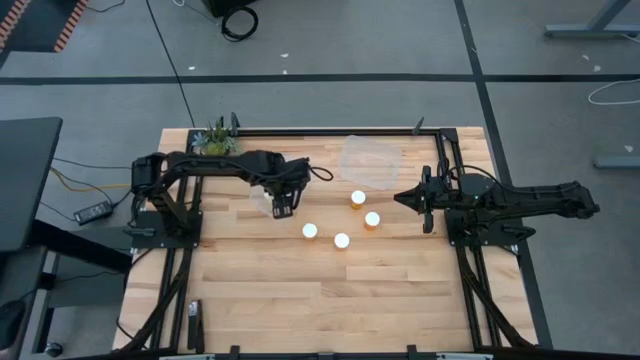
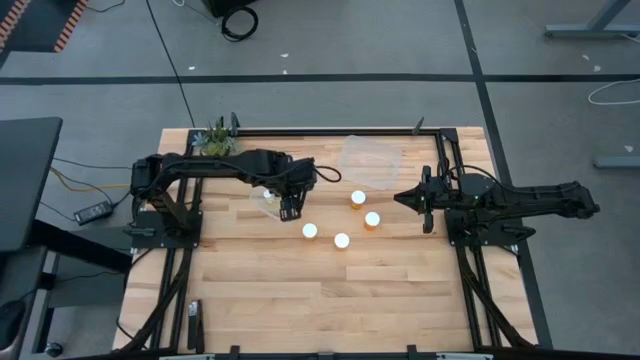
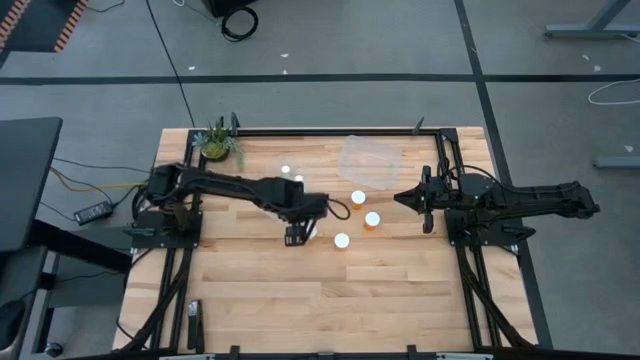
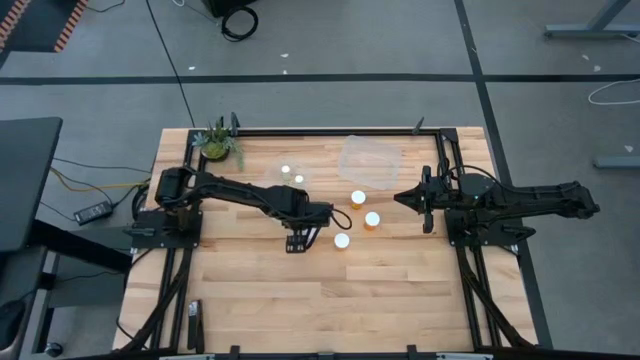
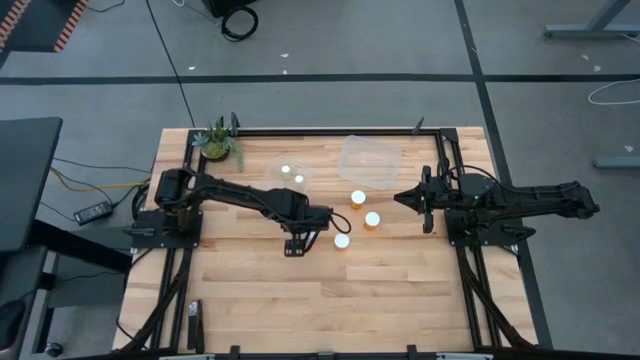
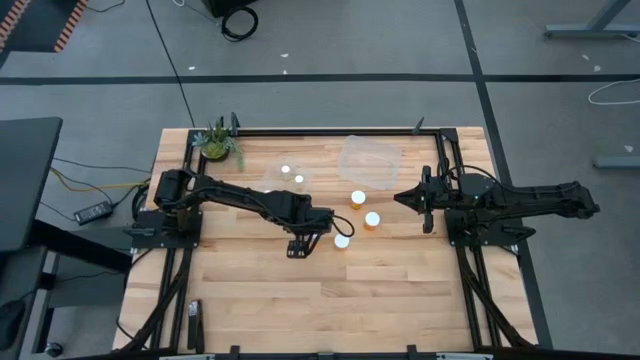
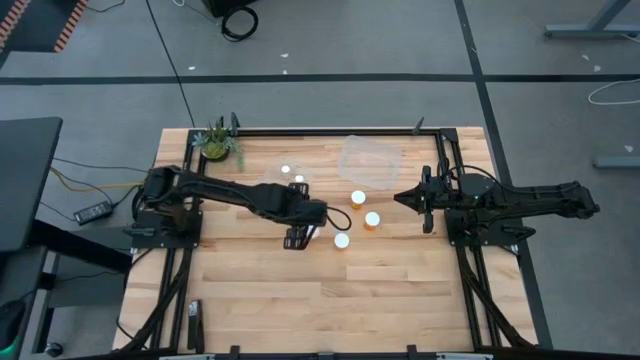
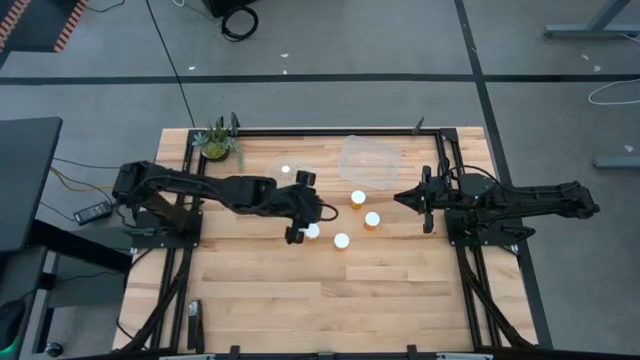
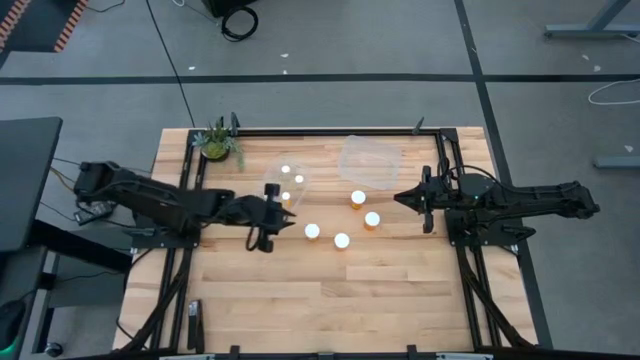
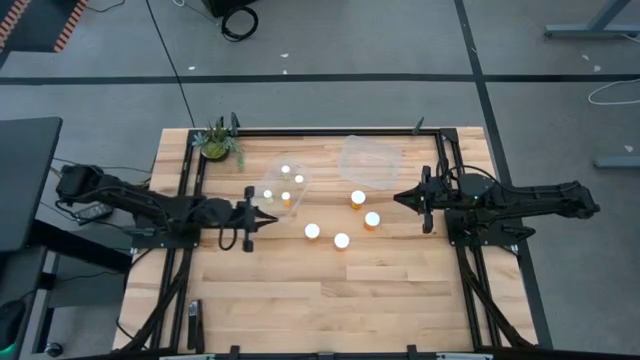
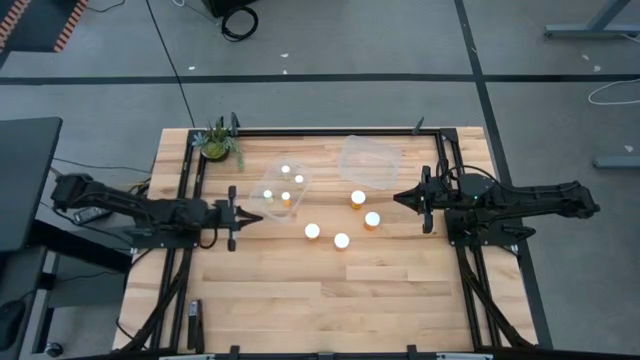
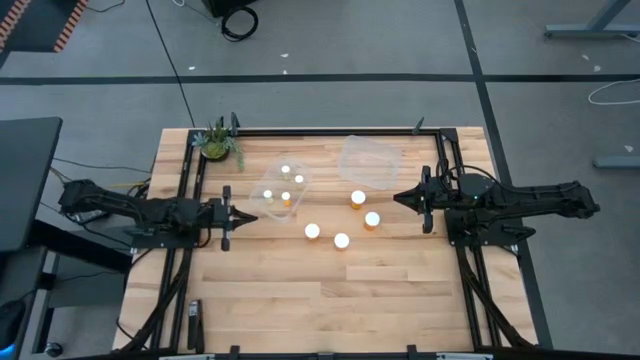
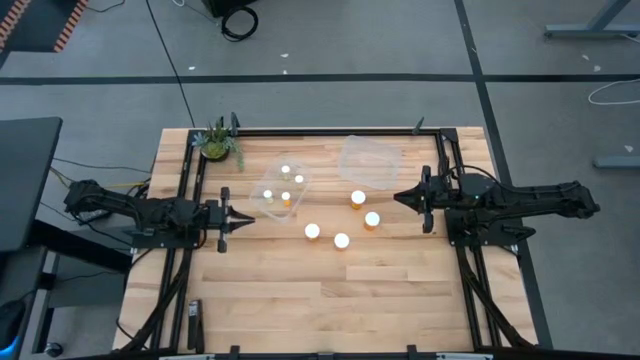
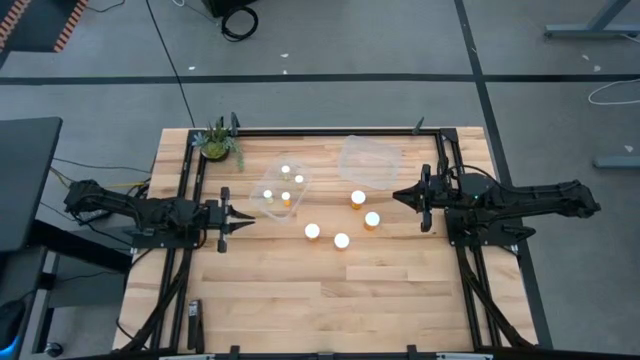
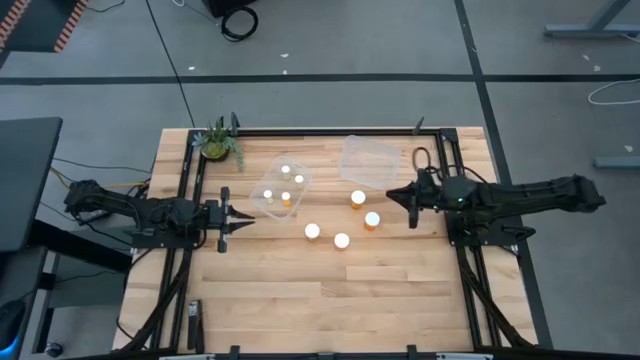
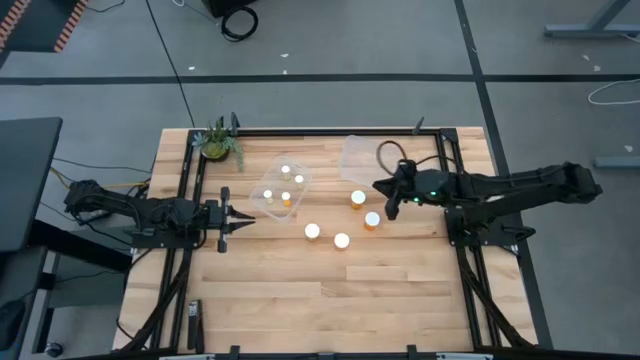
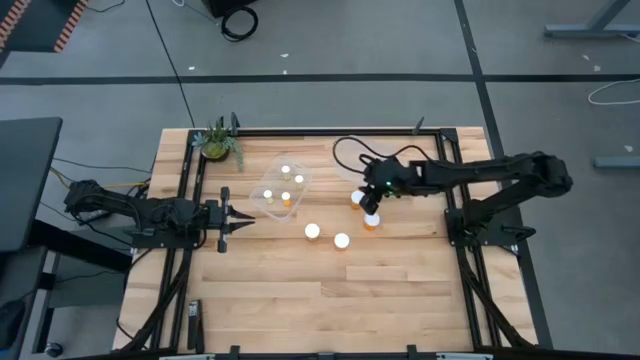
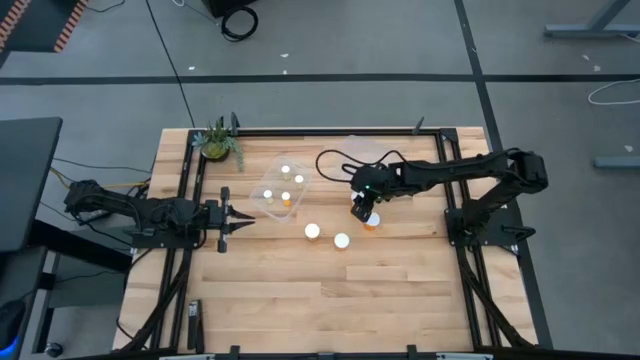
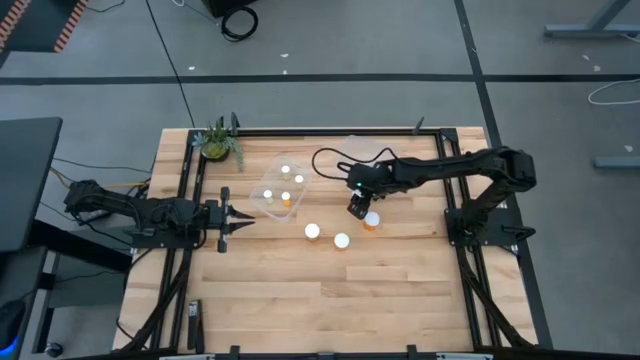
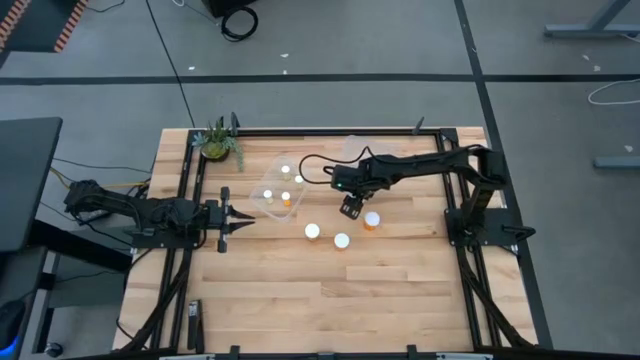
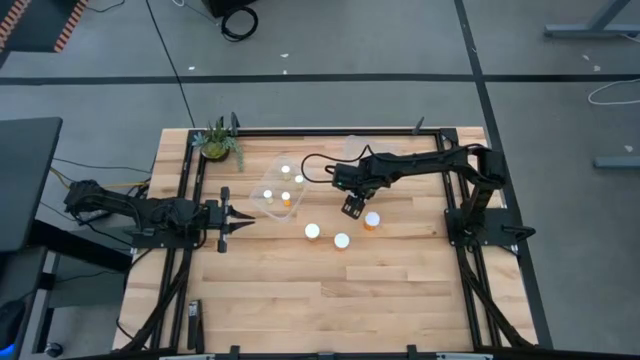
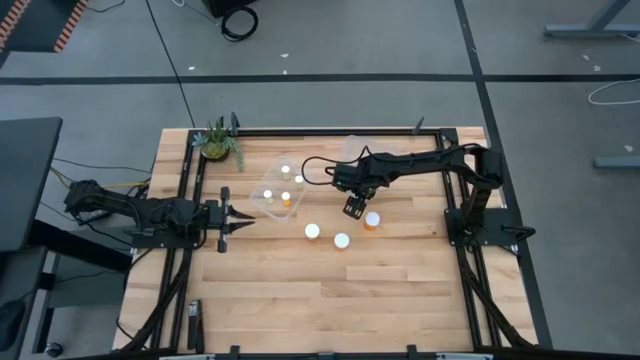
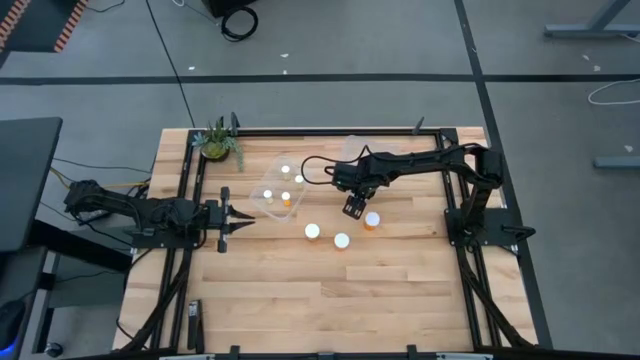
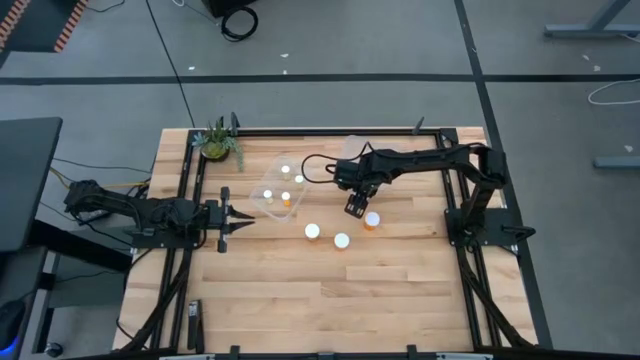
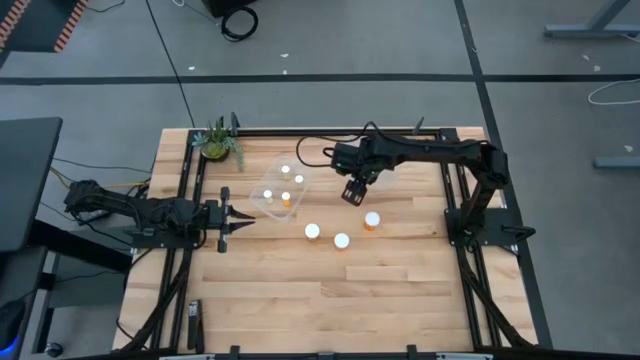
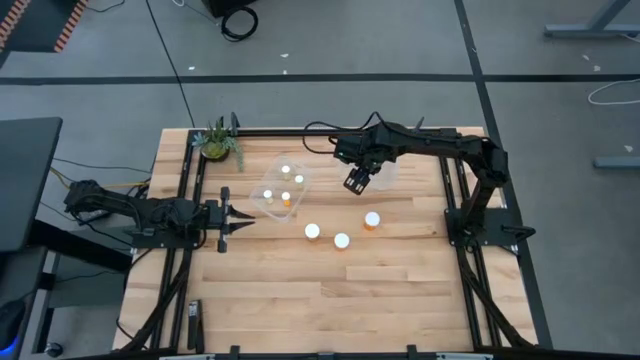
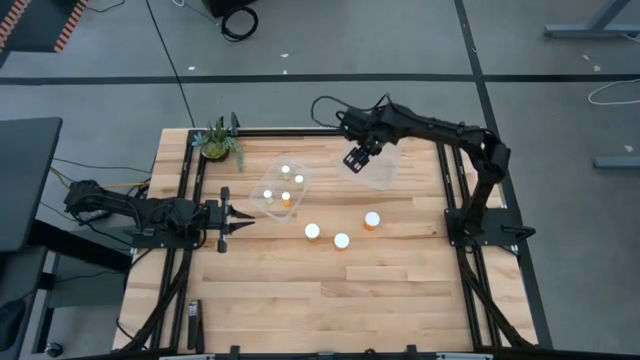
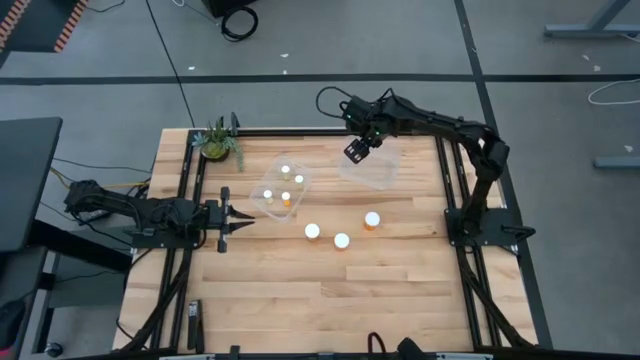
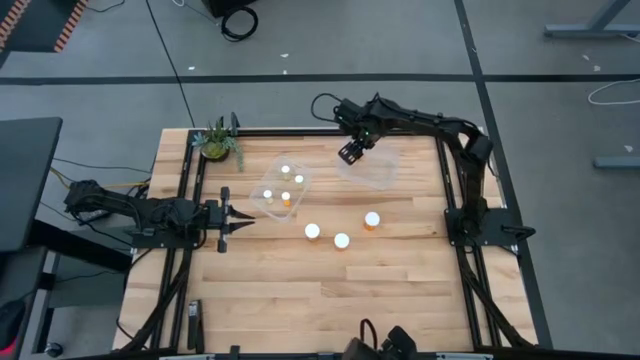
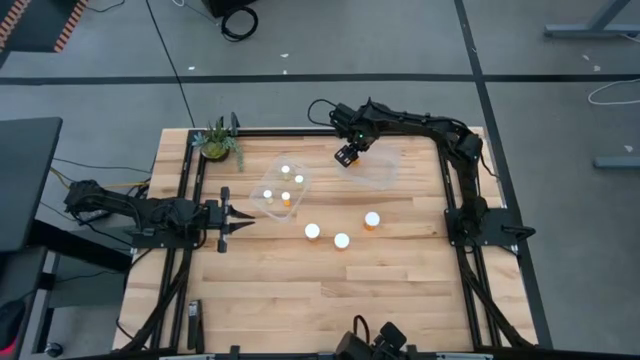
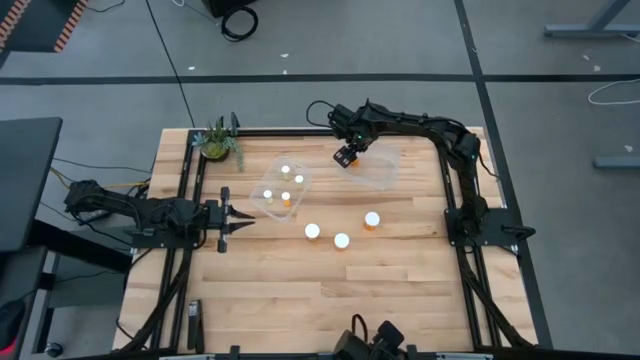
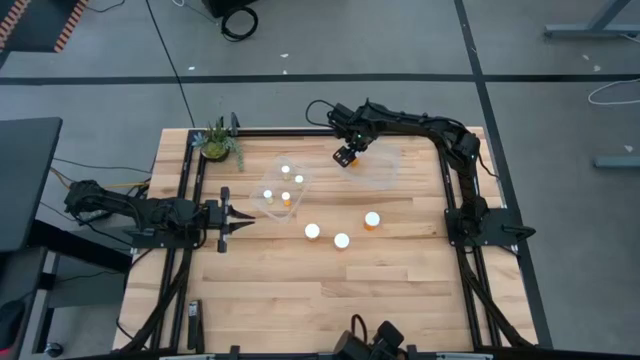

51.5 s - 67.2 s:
Task: Pick and place medicine bottles into bin by pill shape (circle, oval)
Put the large orange pill bottle into the right transparent bin

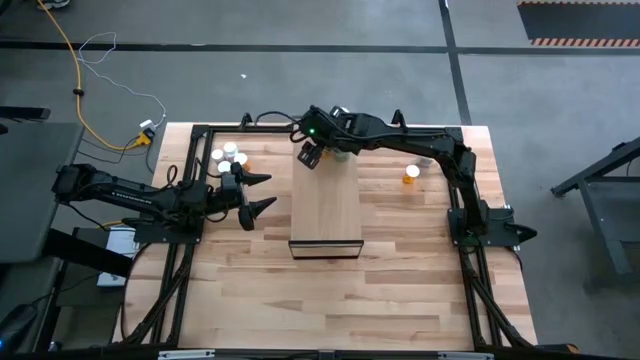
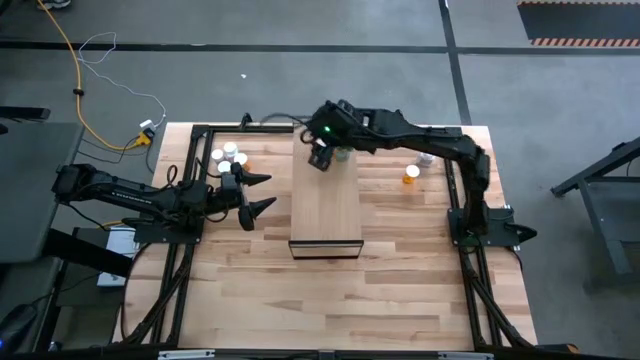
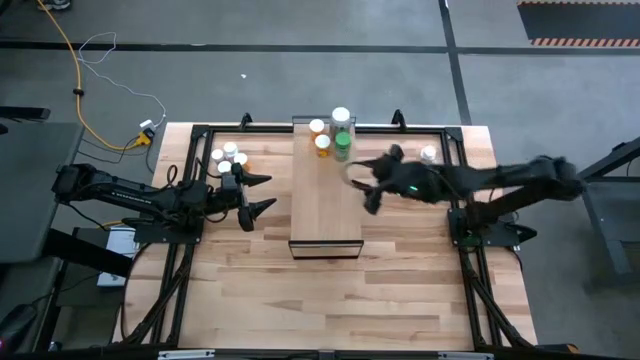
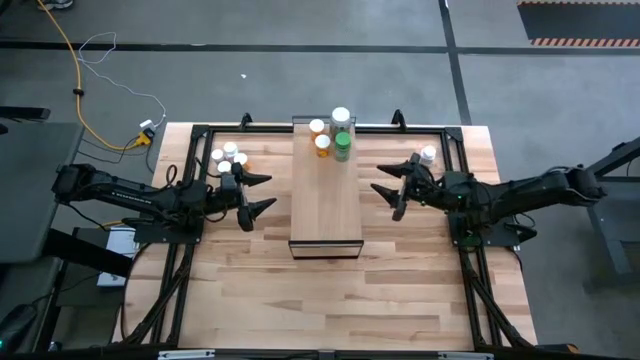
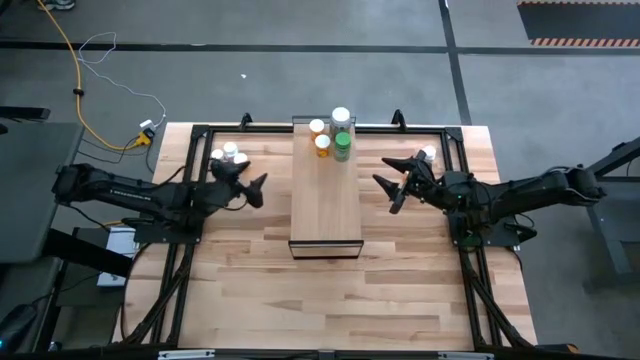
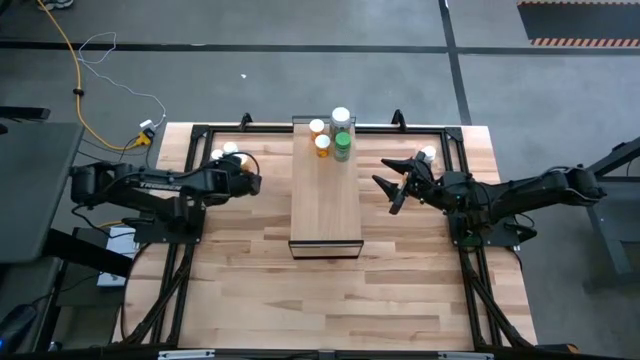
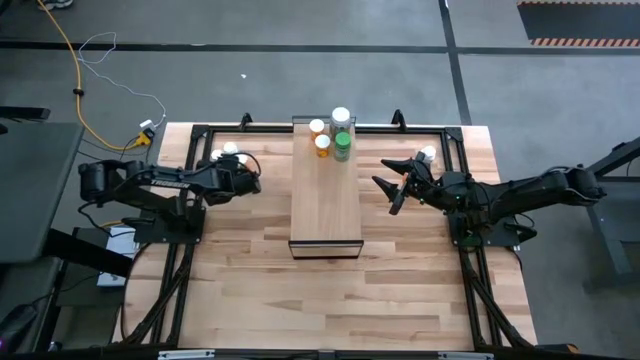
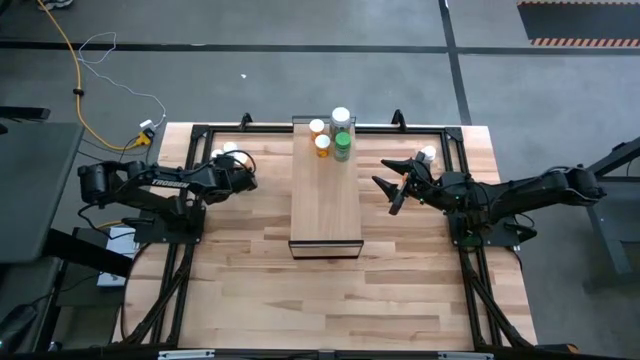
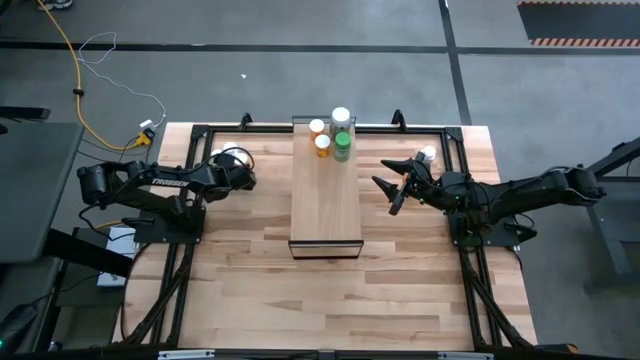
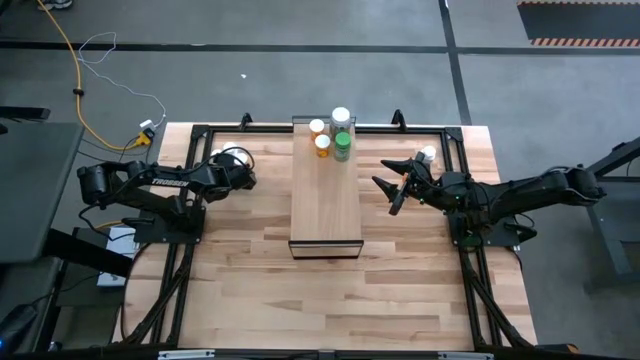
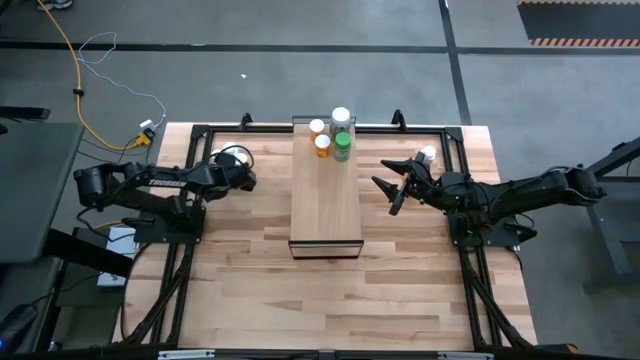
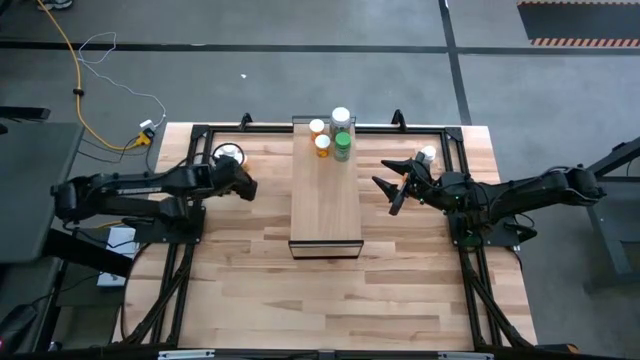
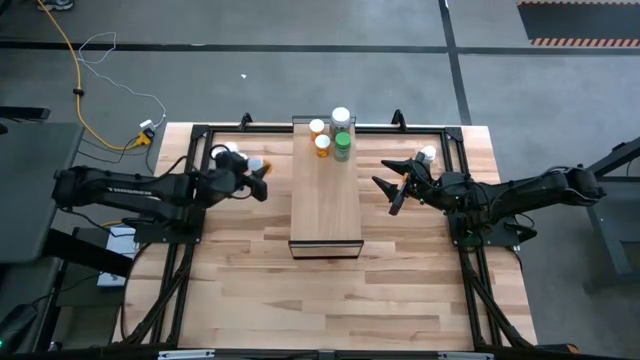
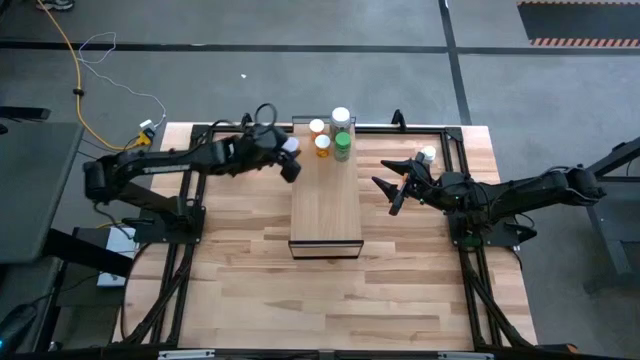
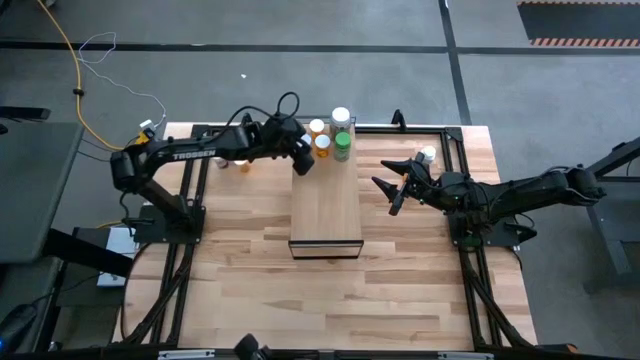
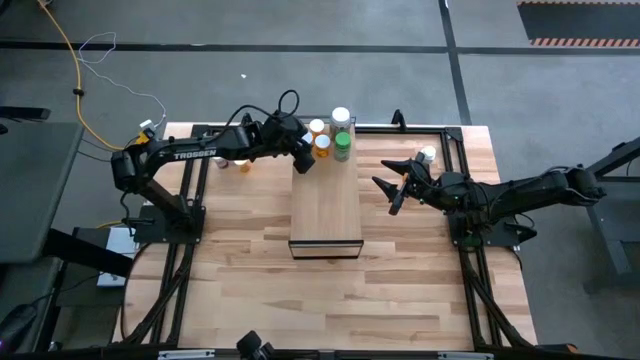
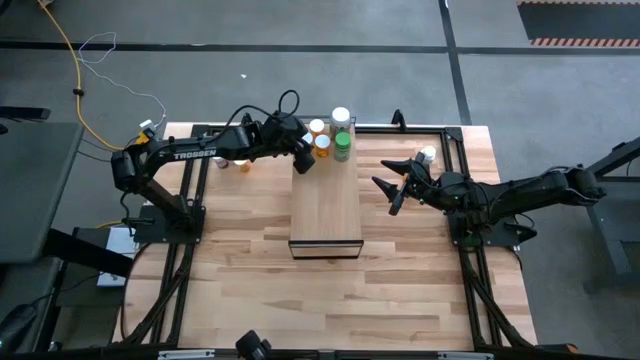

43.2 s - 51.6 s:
Task: Pick and place medicine bottles onto shelf by color
Put the bottom left yellow pill bottle on the shelf
